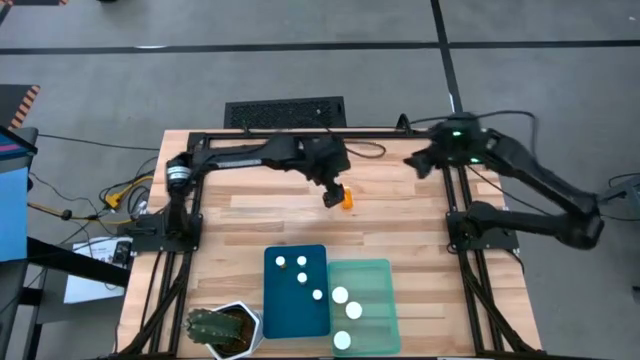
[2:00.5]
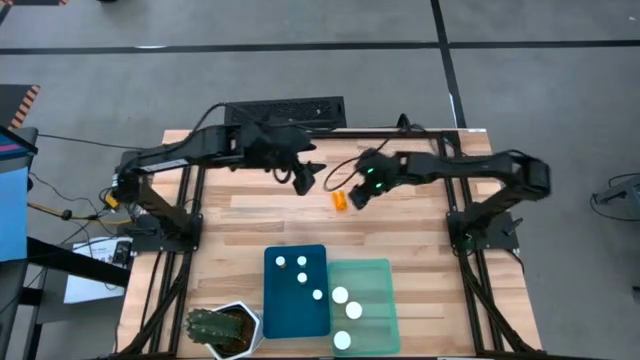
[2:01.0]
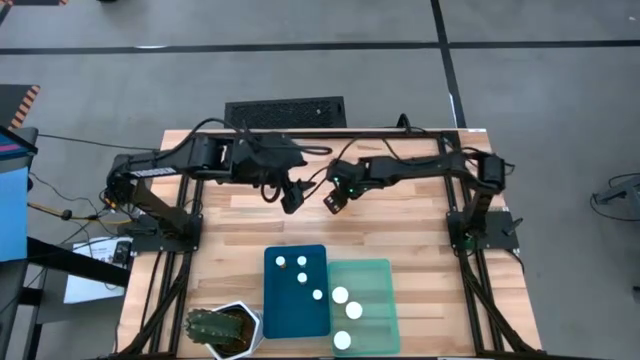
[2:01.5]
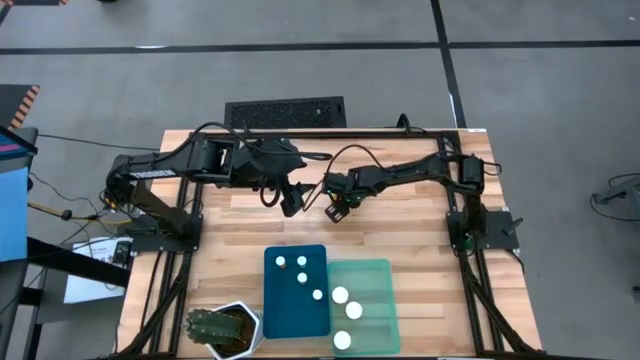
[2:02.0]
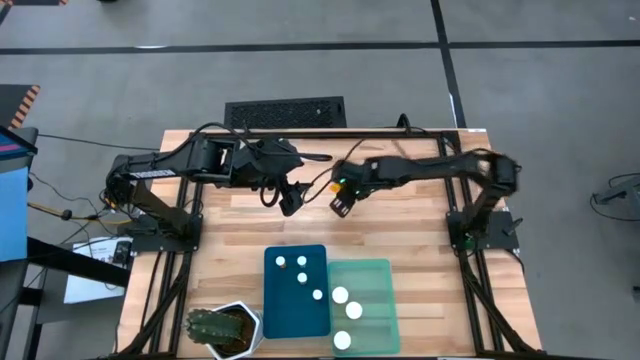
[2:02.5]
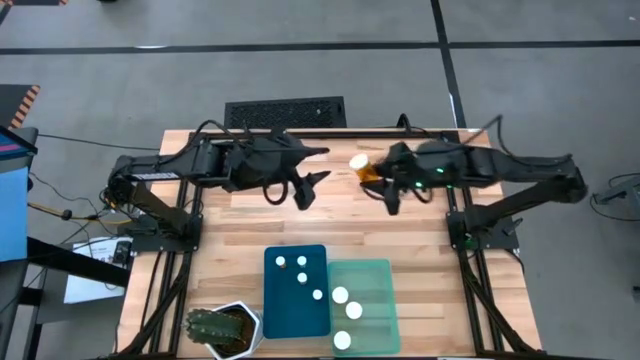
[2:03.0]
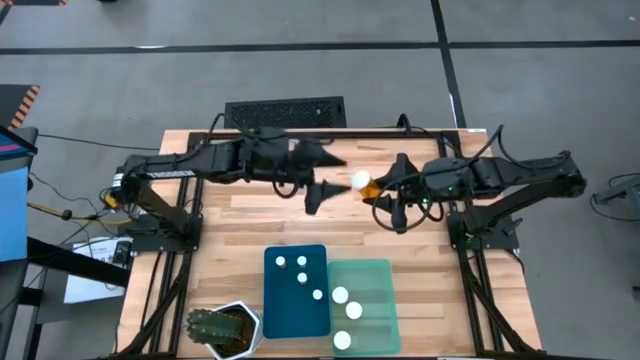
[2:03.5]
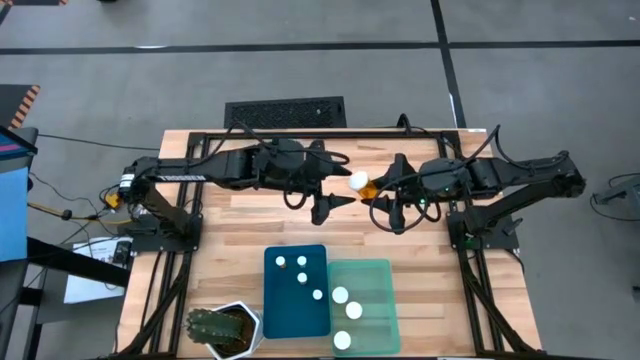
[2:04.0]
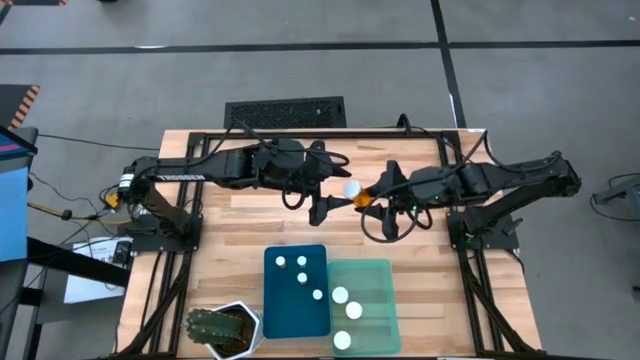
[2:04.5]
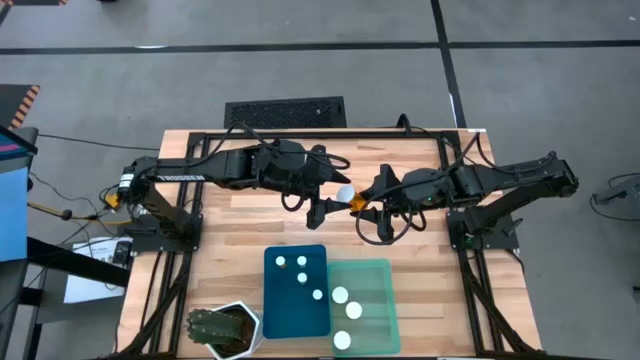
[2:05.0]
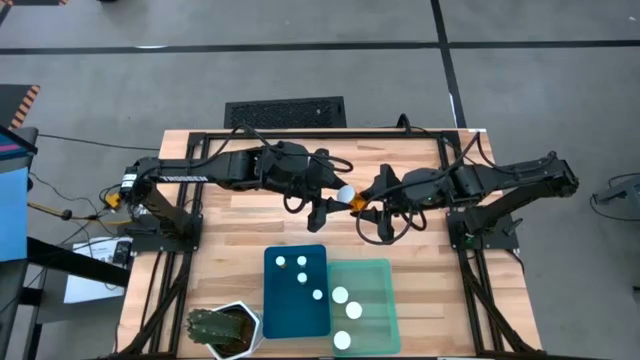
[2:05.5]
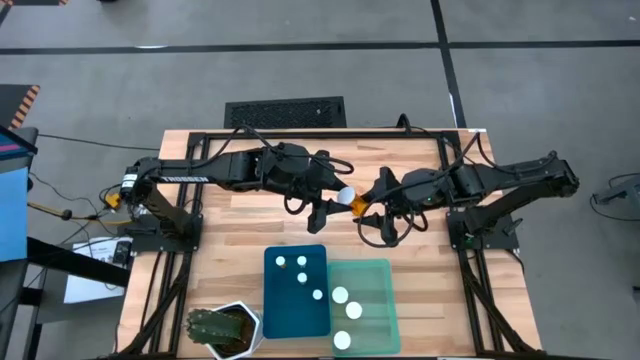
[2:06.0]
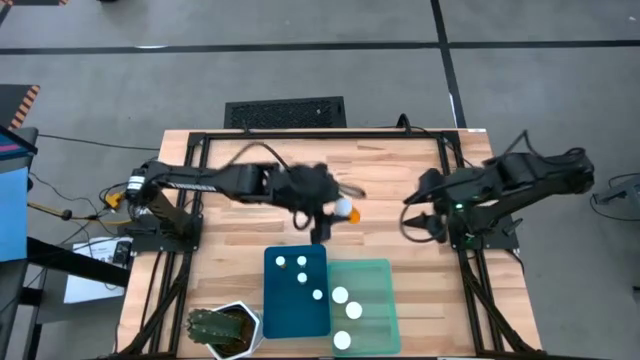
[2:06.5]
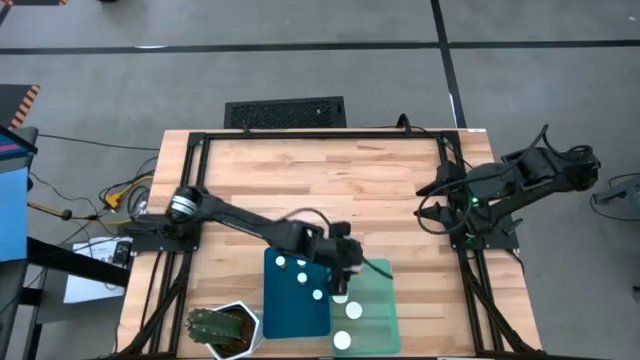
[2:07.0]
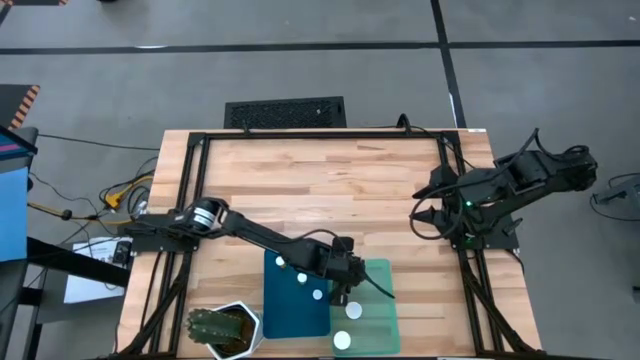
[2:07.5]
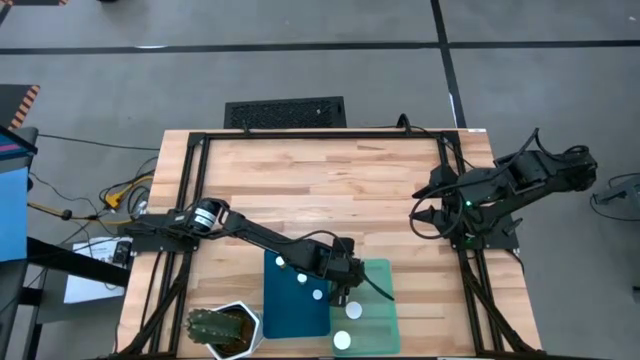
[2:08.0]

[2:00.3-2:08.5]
Task: Pick and place medicine bottles into bin by pill shape (circle, oval)
Put the large orange pill bottle into the green bin

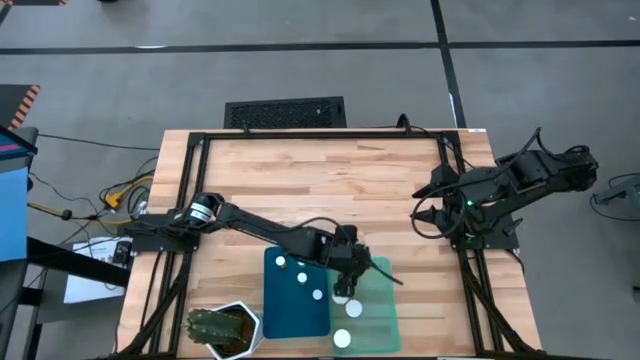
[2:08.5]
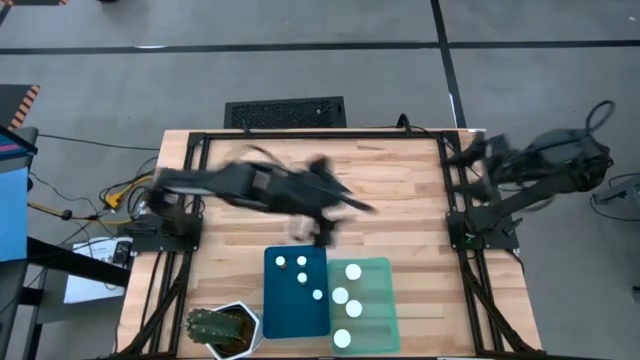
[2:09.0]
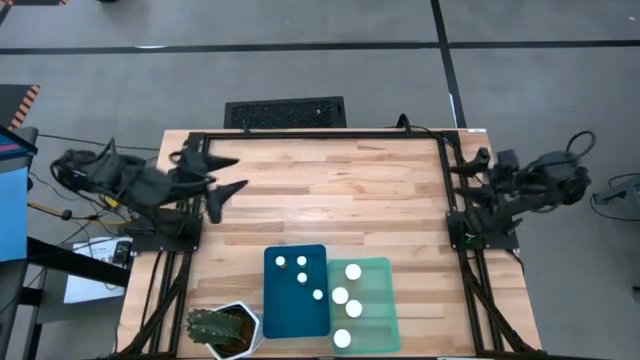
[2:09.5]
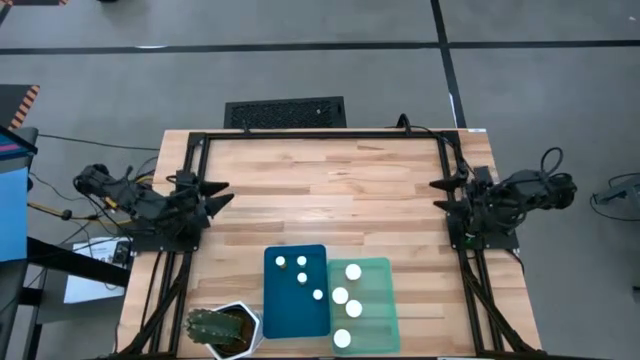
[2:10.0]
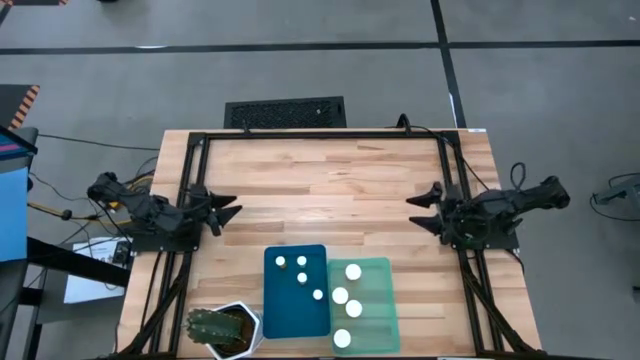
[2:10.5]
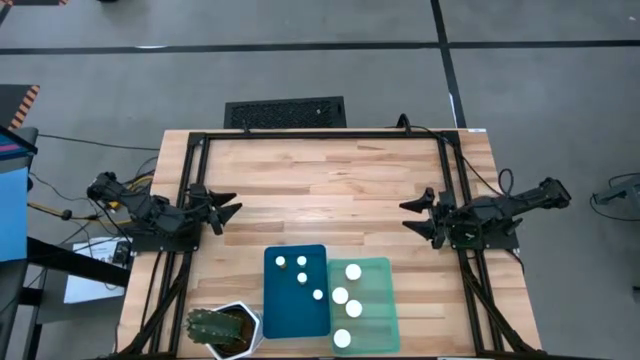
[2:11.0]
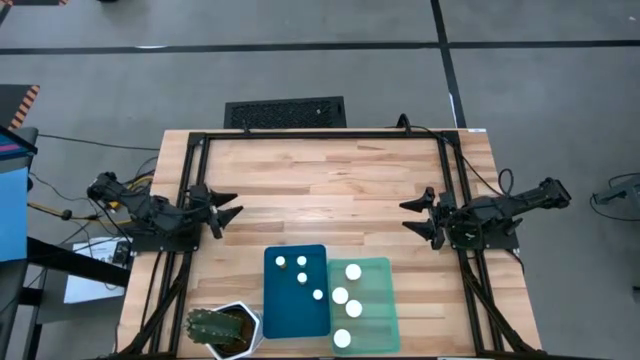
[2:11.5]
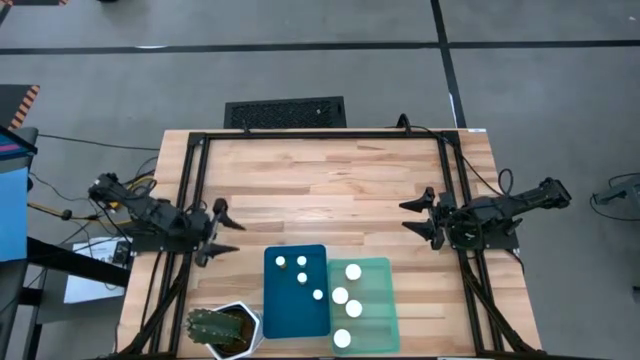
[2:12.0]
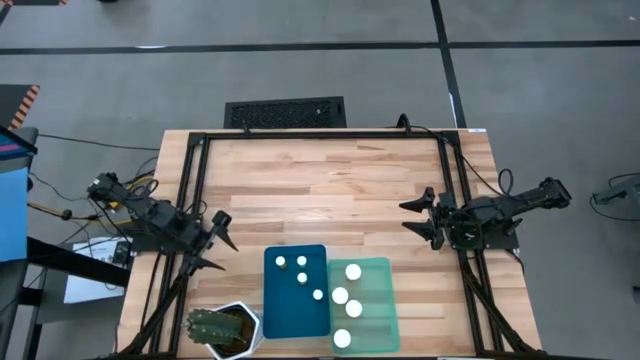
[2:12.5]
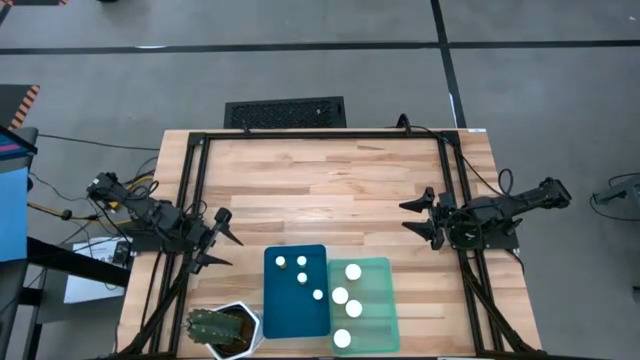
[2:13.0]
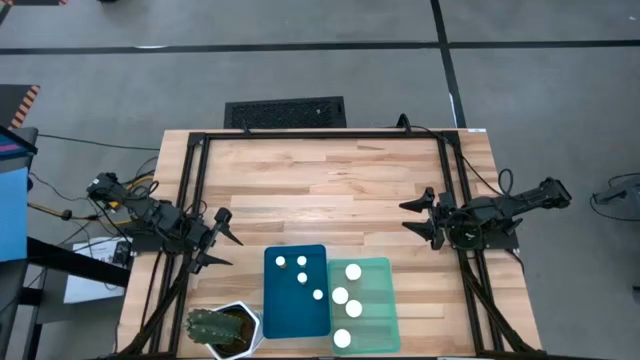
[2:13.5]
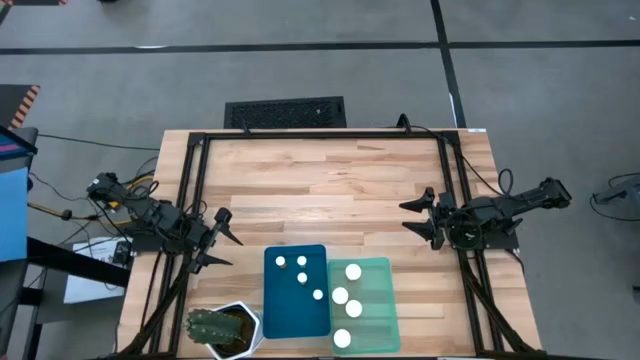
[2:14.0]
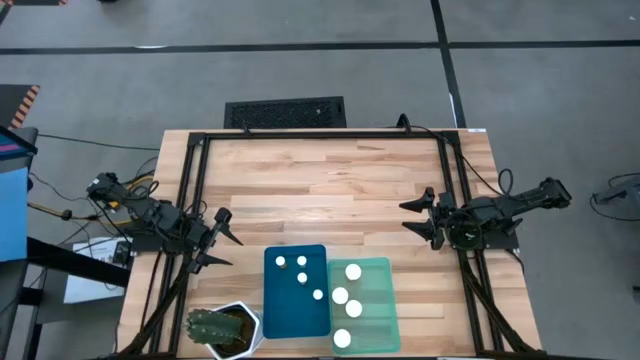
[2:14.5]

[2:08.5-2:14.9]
Return to Home Position

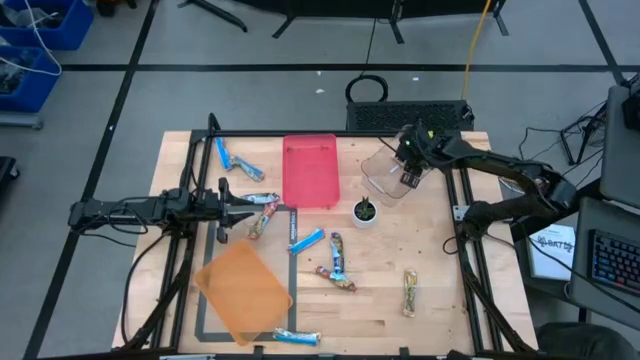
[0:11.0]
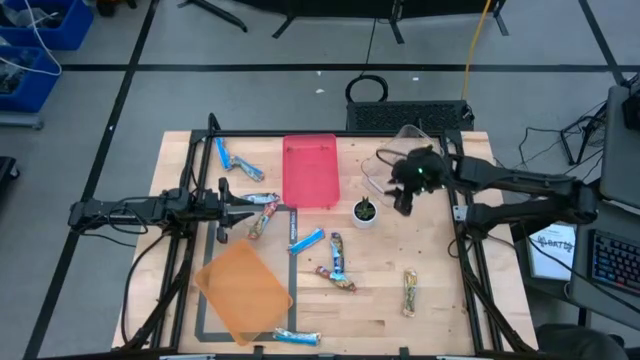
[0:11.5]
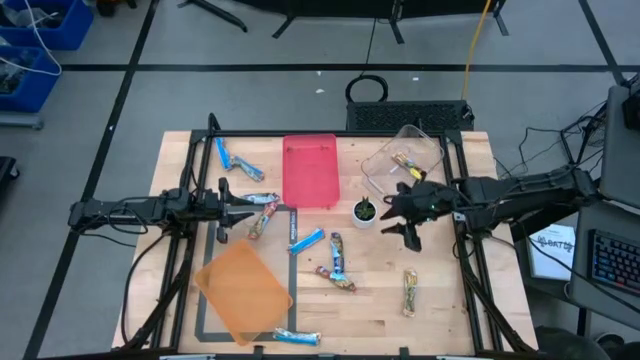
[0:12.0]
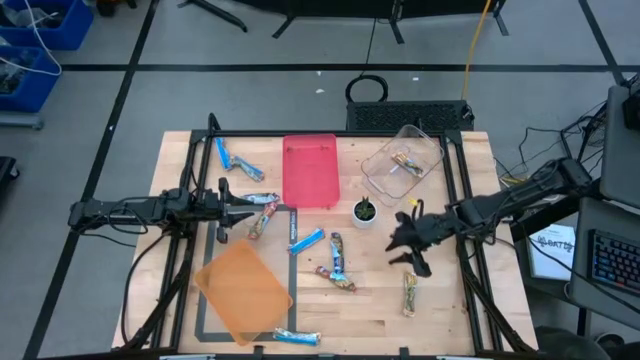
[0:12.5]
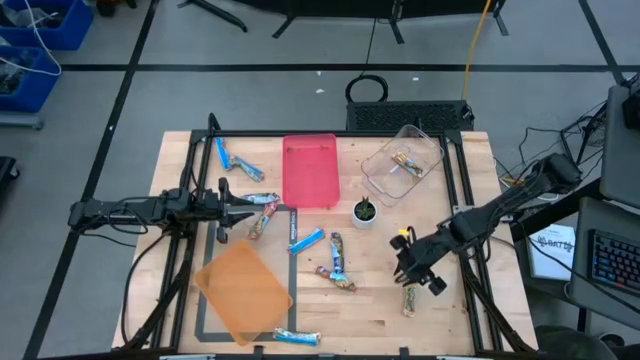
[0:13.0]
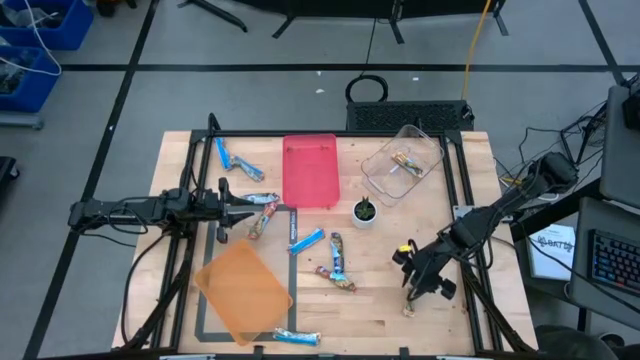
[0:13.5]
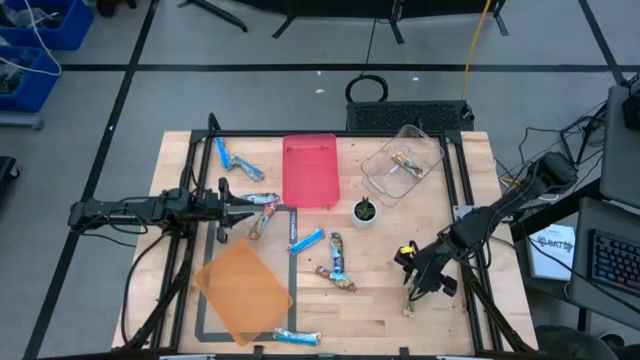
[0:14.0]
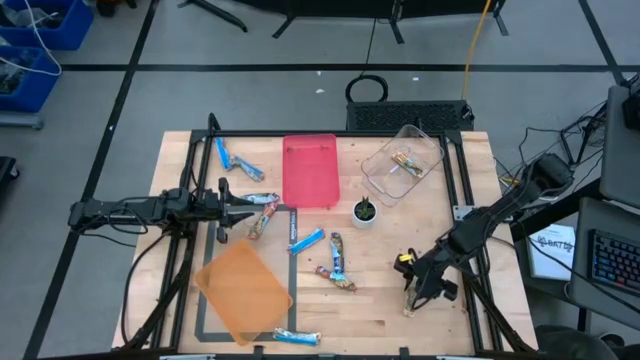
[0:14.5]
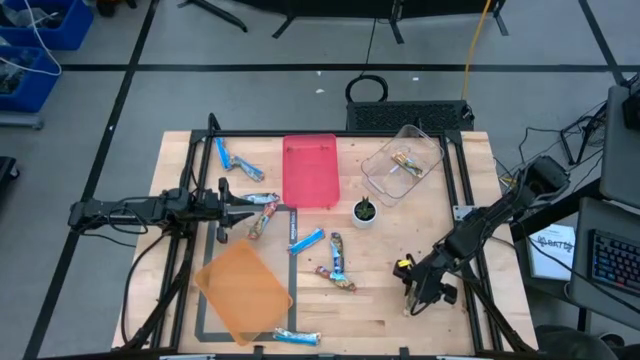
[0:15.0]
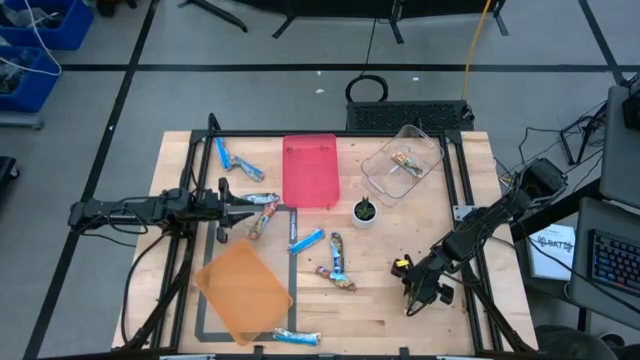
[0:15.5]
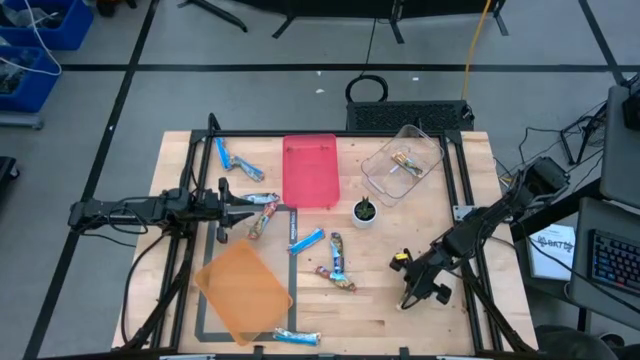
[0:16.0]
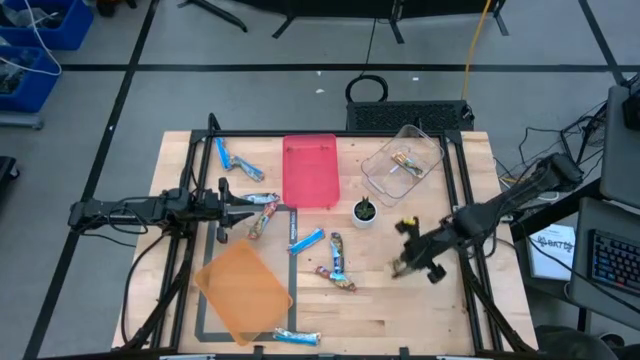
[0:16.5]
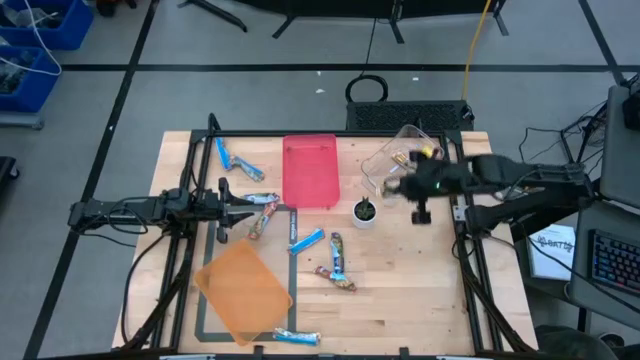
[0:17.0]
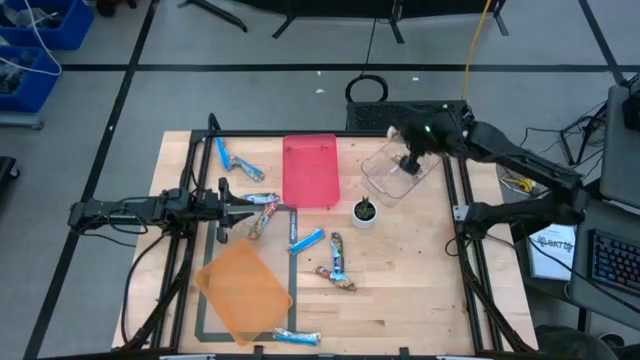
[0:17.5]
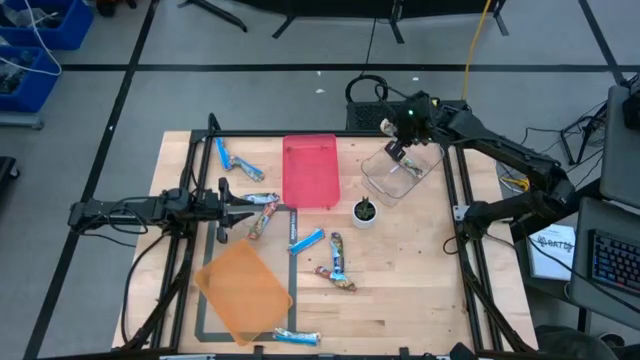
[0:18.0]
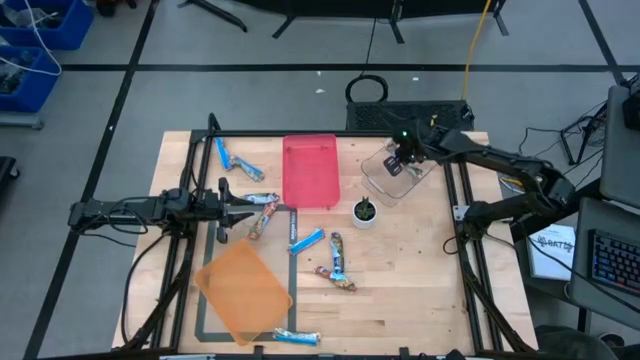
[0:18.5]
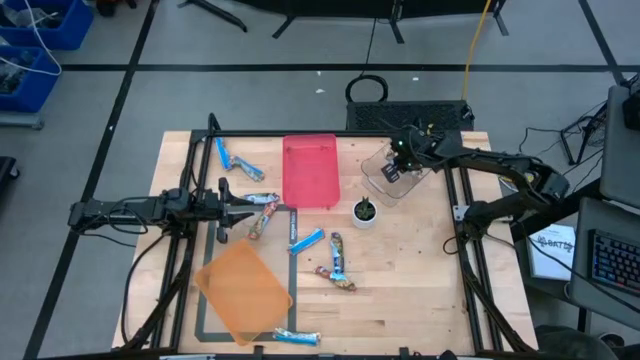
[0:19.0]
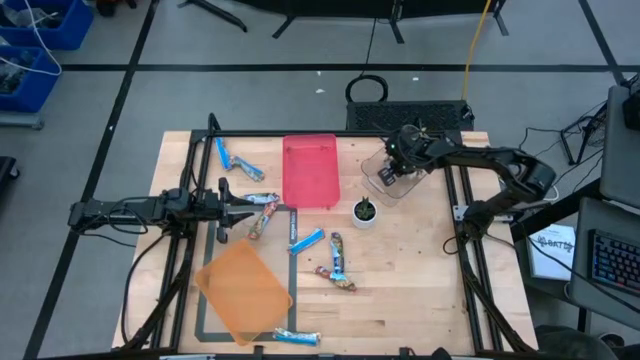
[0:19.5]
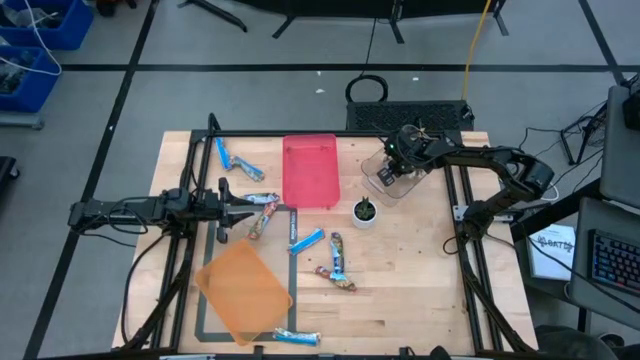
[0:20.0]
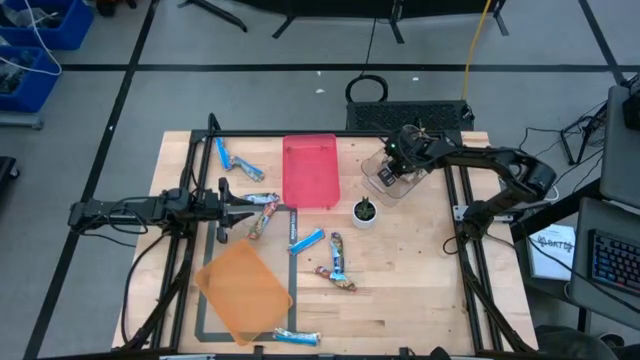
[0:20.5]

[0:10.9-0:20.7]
Task: Pick and place Granola Bars by type
Put the orange granola bar into the transparent bin
